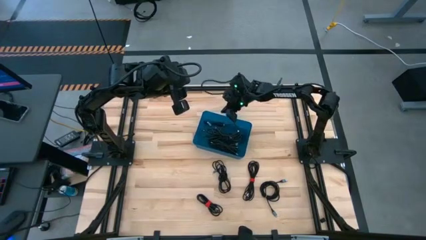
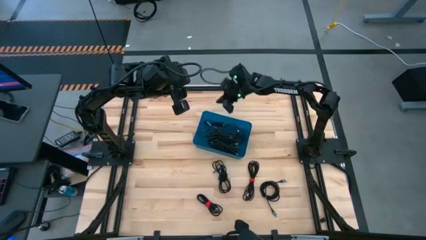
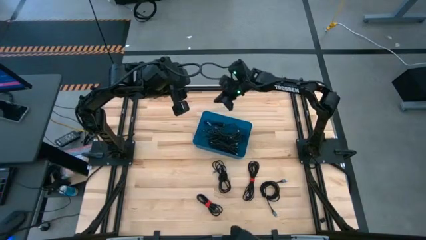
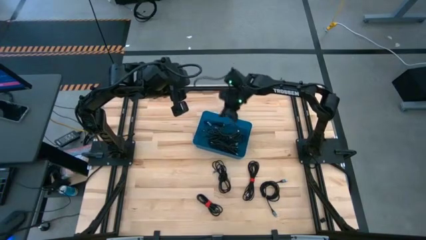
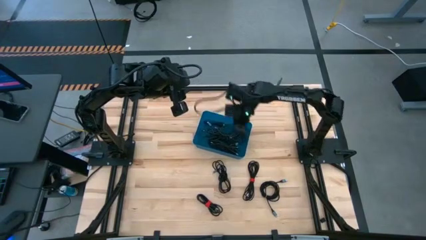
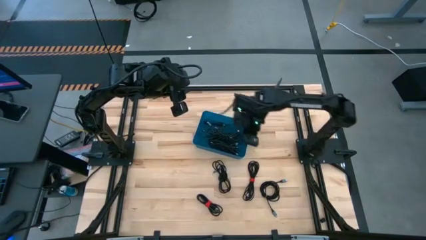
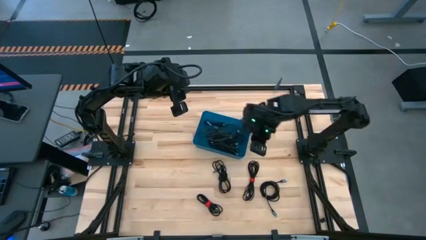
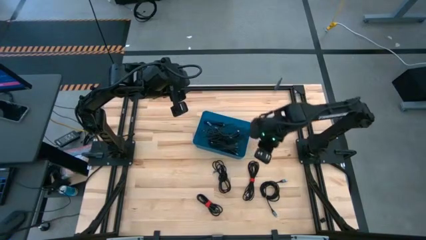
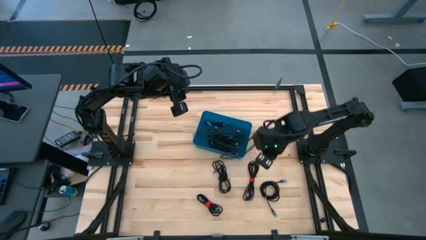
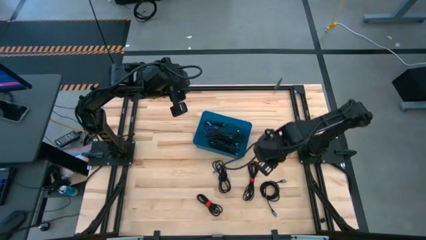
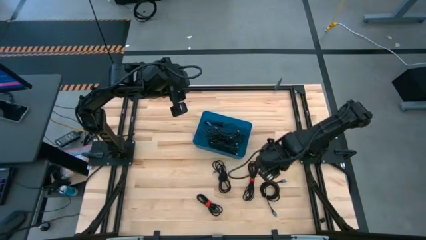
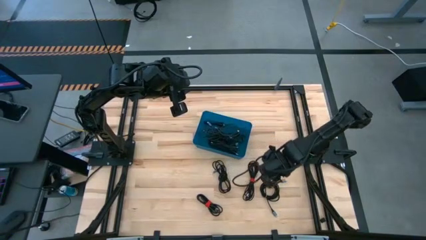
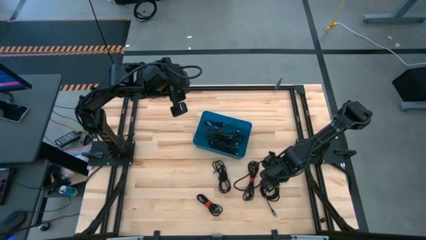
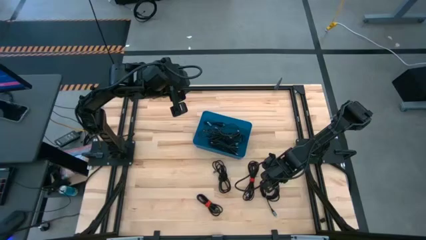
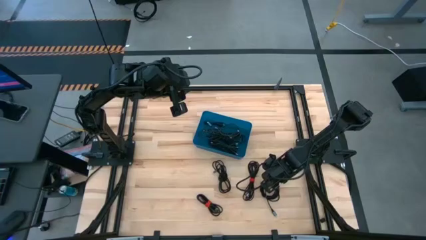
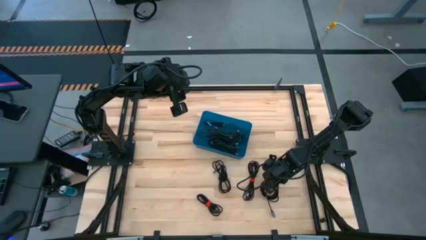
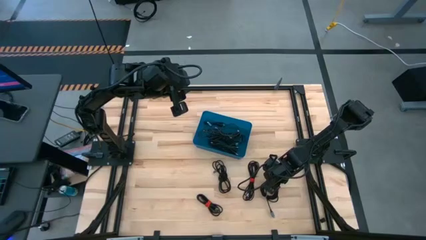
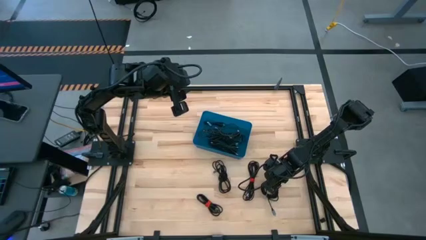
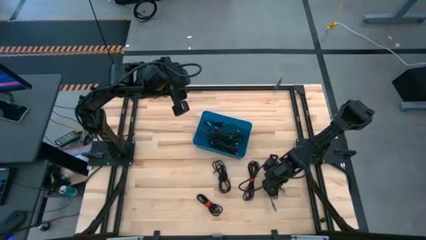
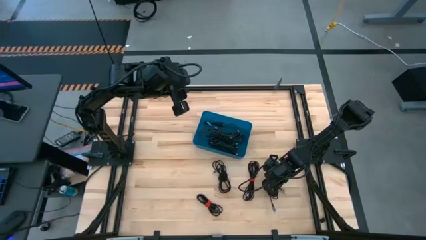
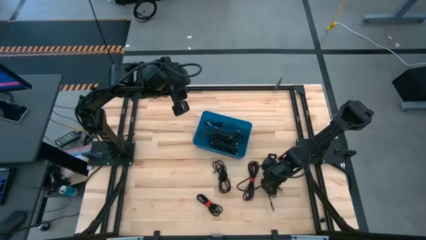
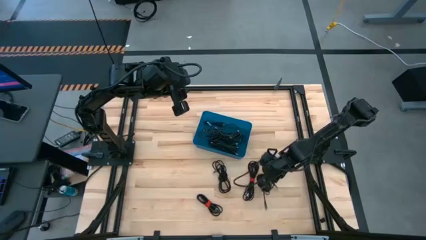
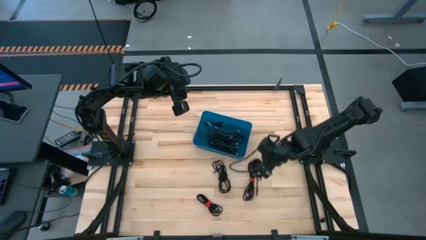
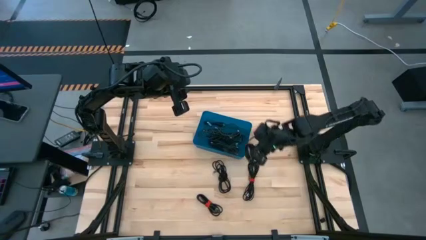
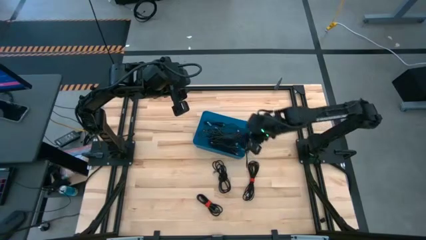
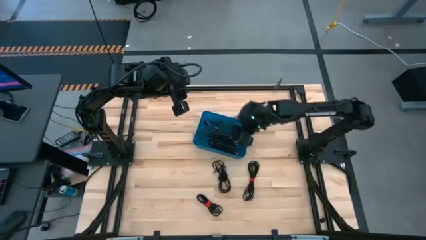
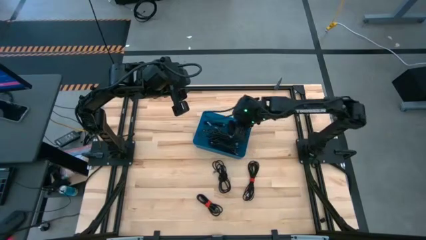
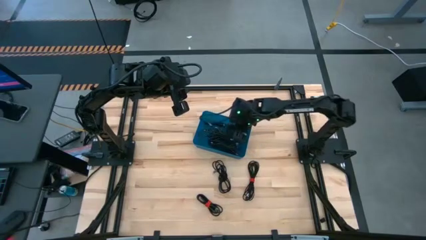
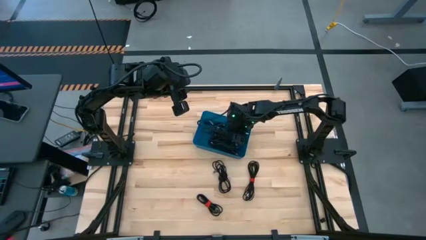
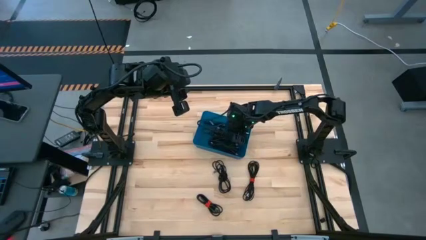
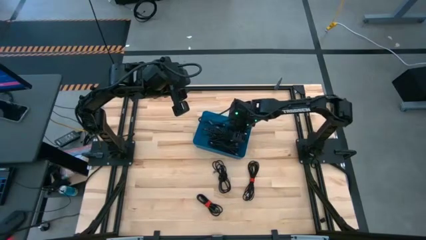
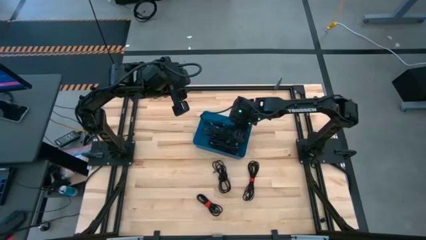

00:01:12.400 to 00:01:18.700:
Task: Pick and place USB-C Cables
Put the black charger cable into the blue bin

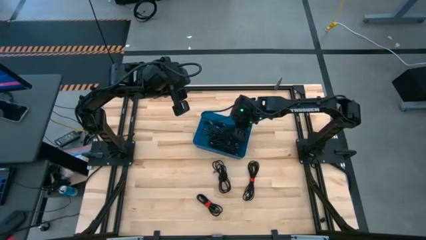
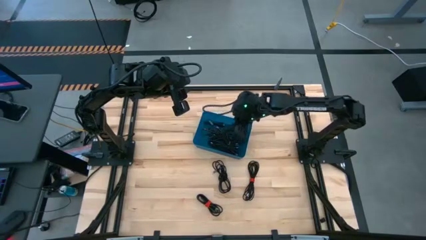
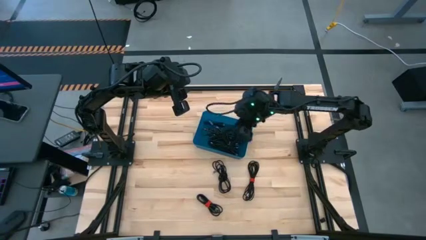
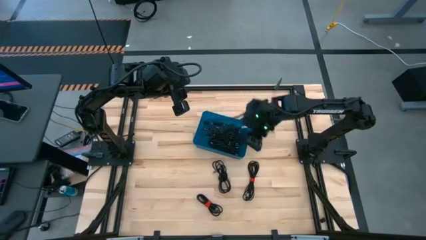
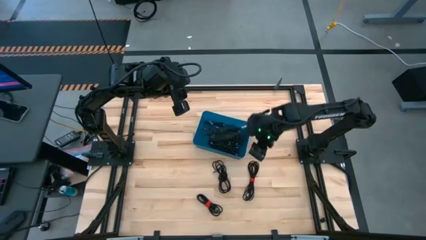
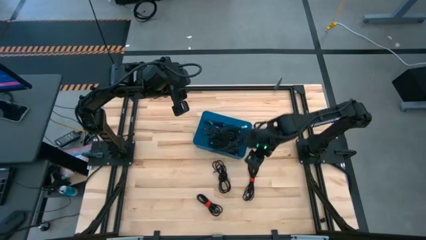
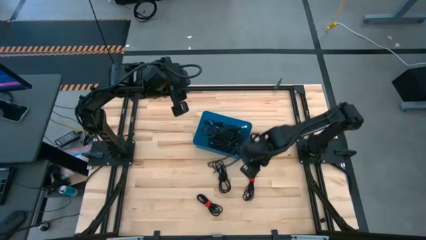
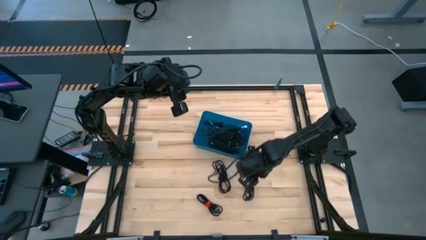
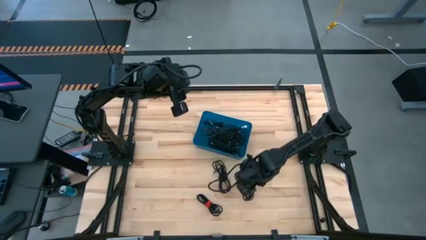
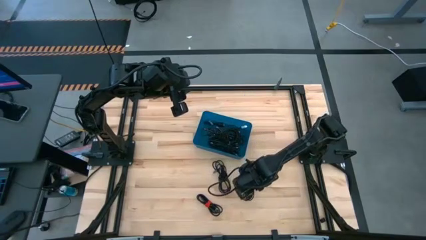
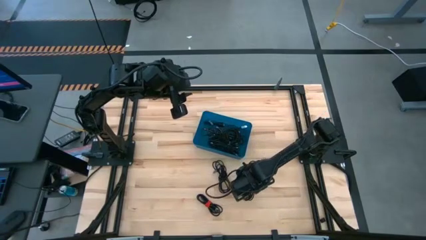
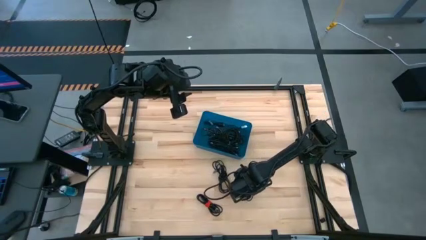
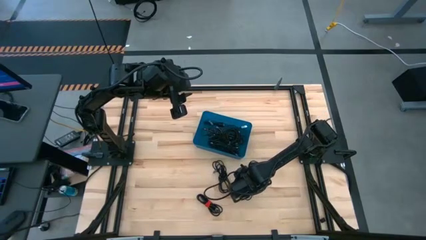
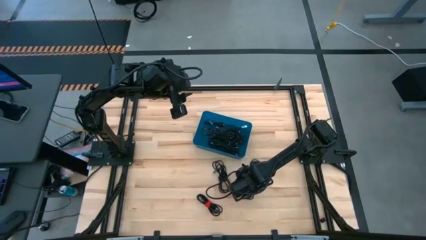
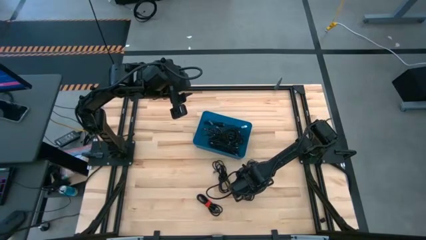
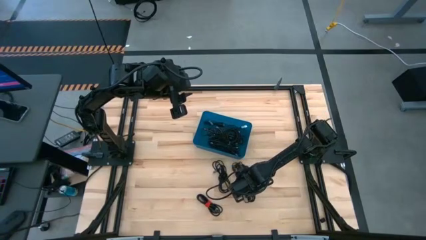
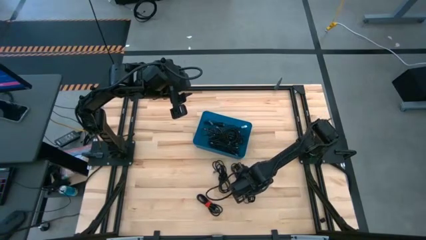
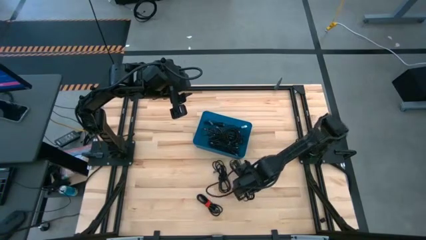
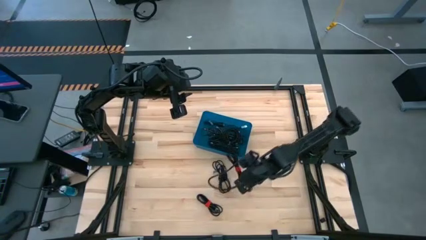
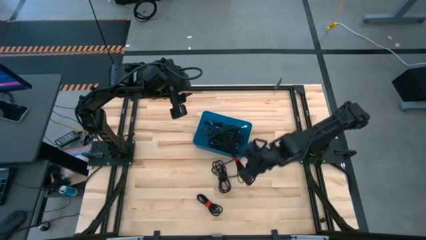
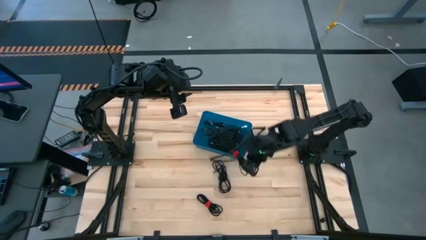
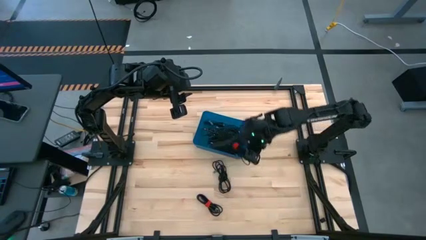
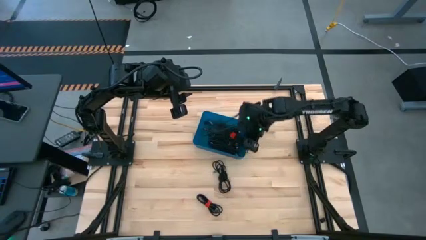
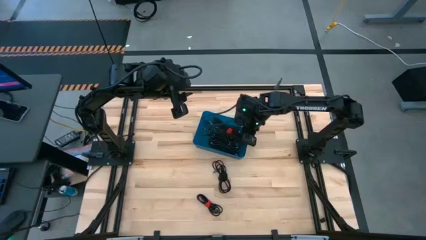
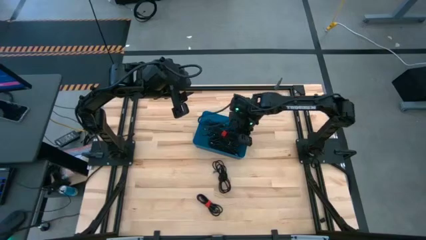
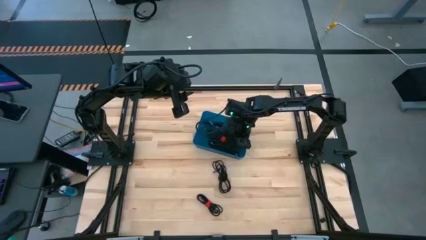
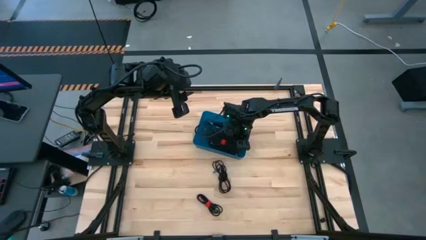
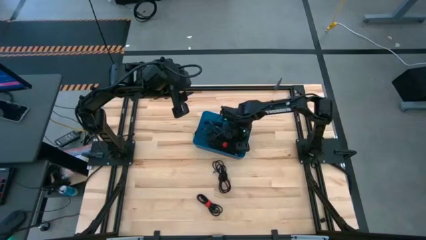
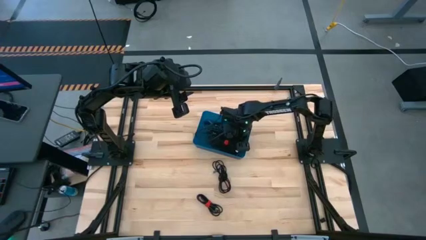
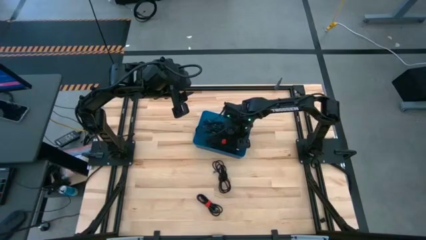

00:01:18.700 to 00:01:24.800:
Put the black charger cable into the blue bin

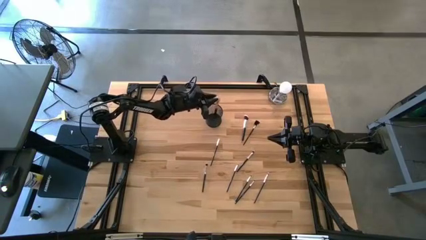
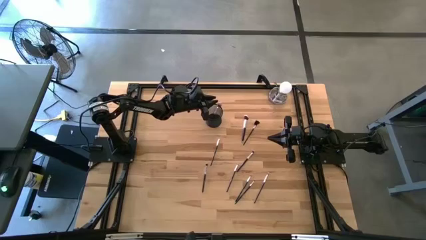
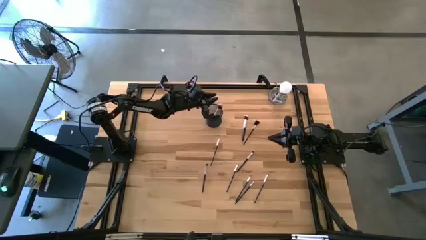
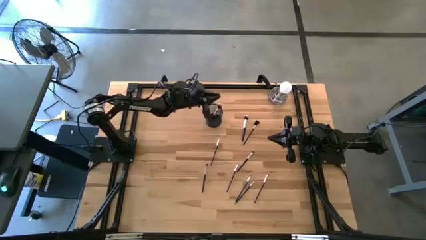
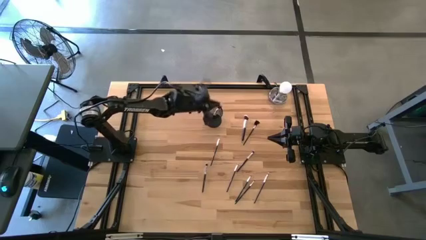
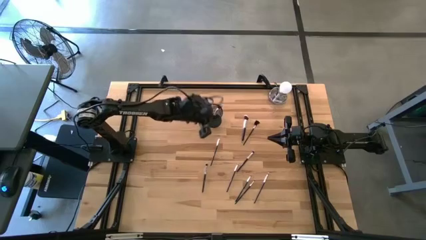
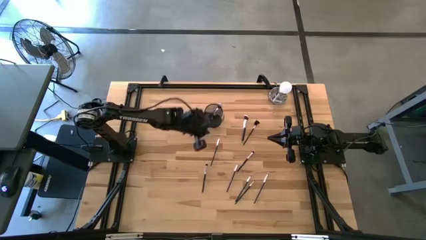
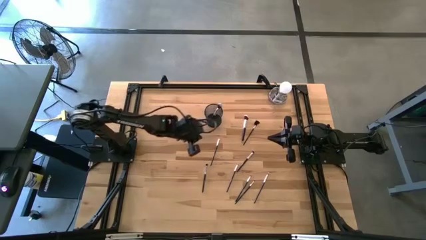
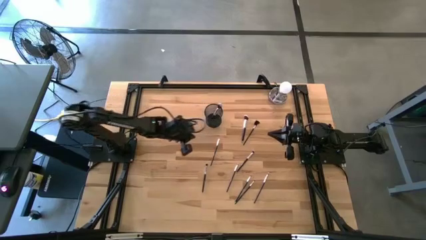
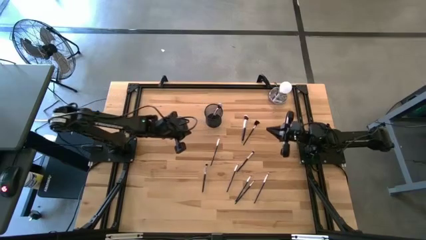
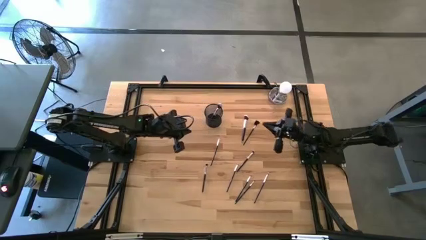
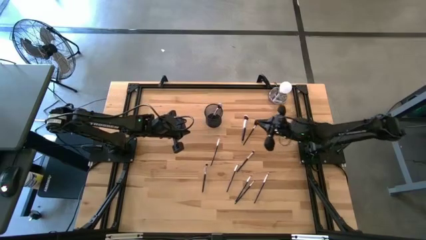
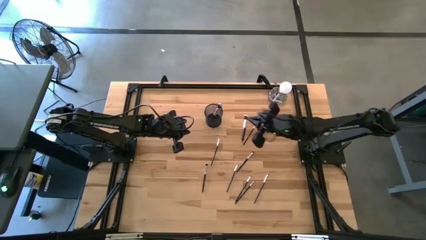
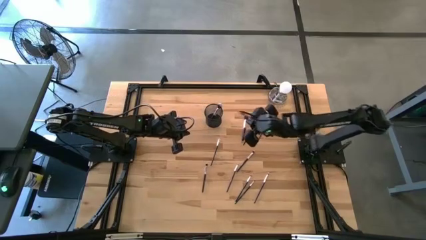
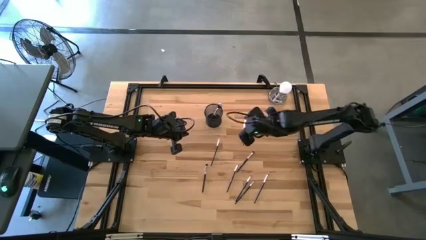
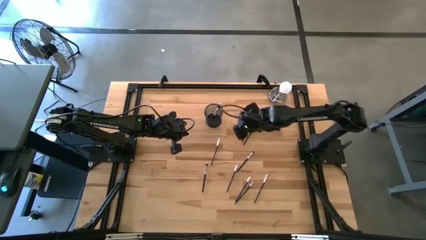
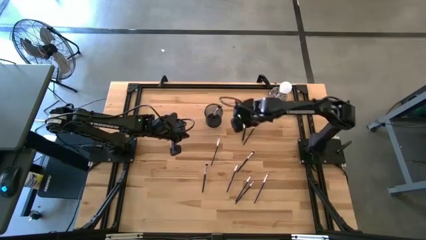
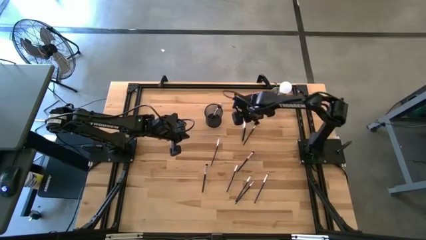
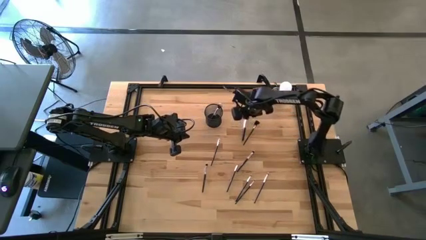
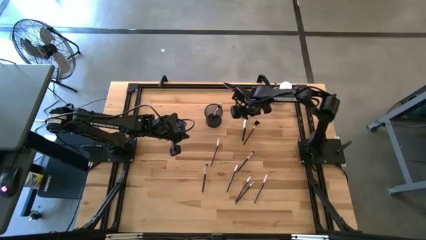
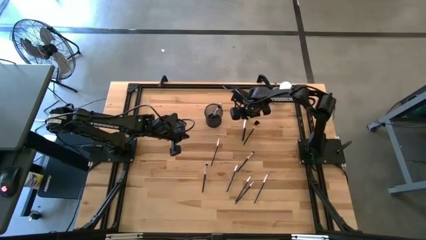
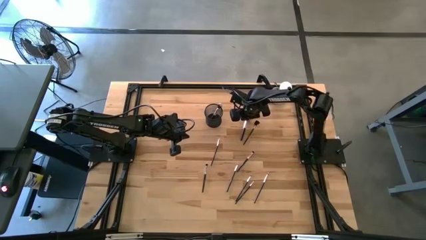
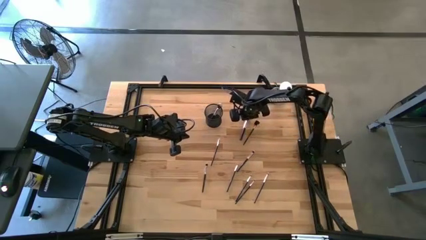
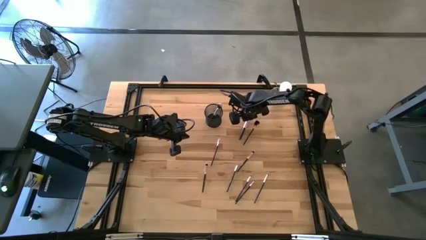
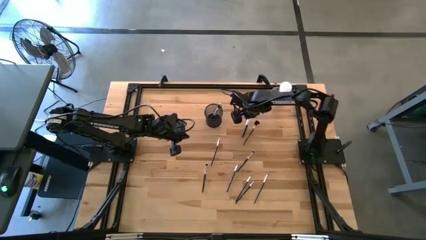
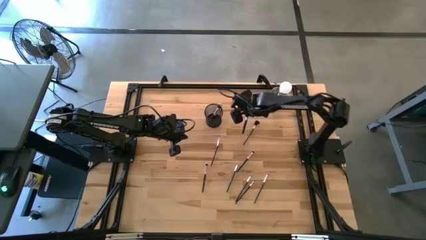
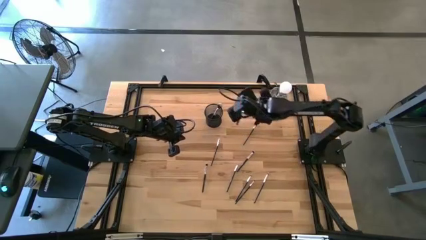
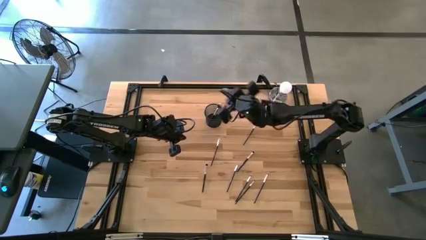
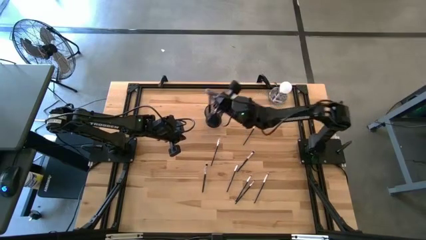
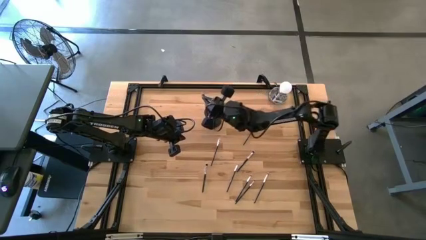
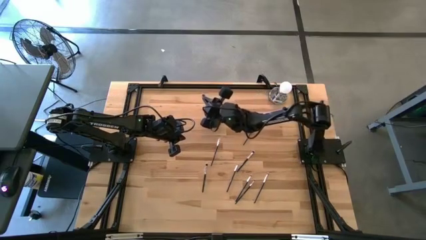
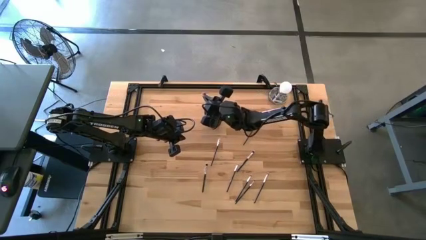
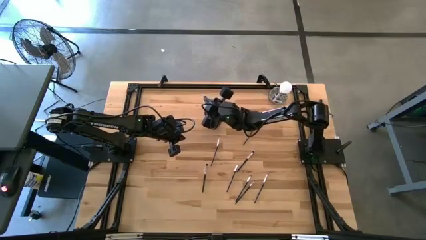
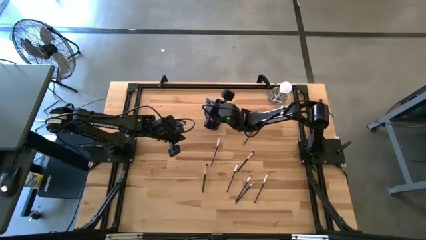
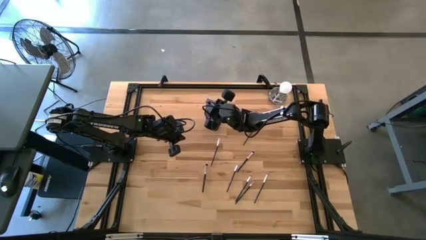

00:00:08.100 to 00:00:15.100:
Task: Pick & Place Makeup Brushes
Put the large white make-up brush into the black container
